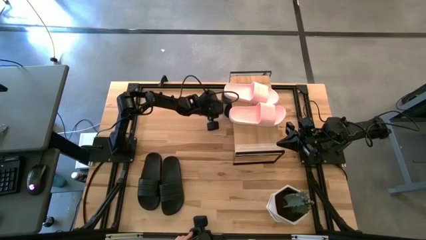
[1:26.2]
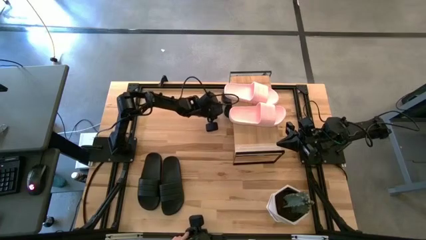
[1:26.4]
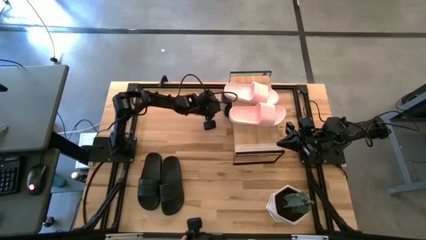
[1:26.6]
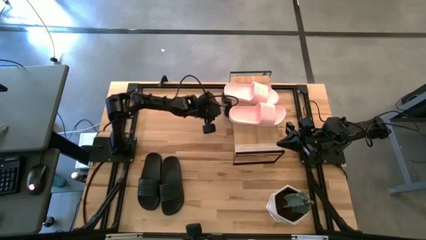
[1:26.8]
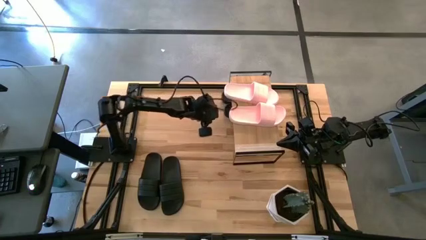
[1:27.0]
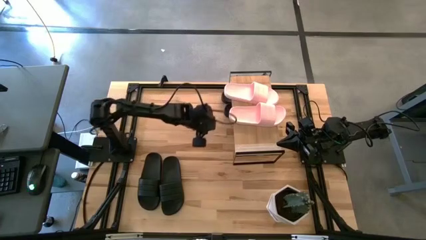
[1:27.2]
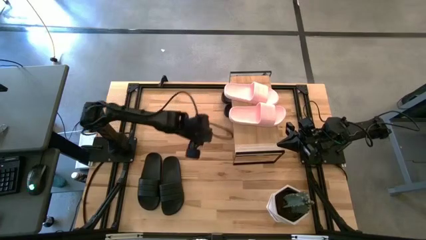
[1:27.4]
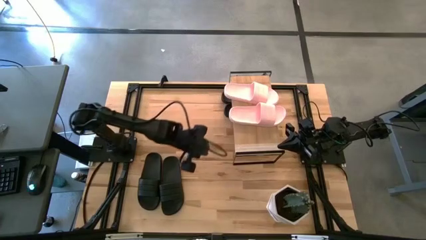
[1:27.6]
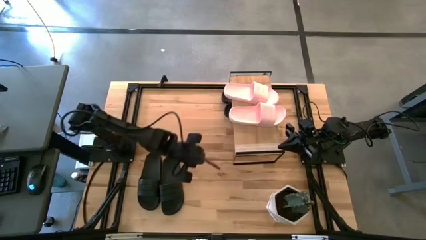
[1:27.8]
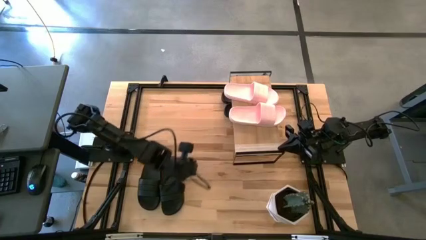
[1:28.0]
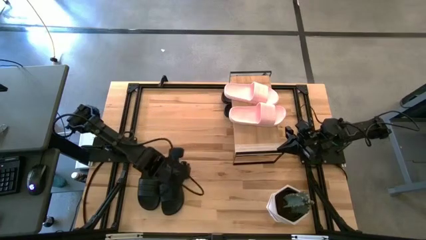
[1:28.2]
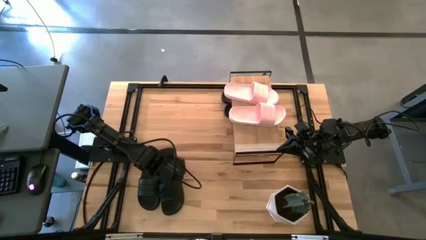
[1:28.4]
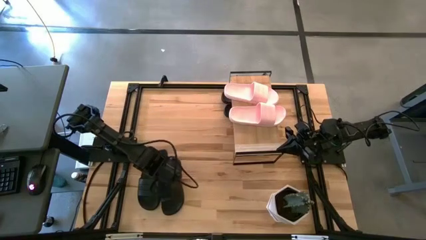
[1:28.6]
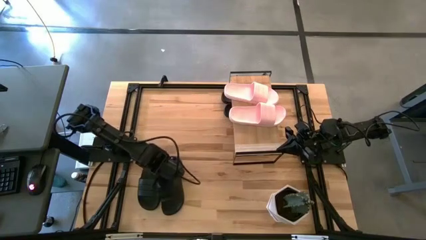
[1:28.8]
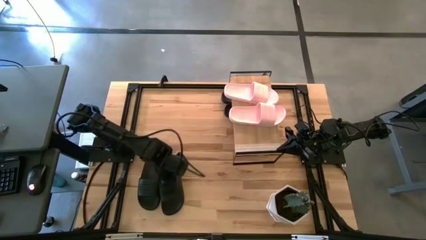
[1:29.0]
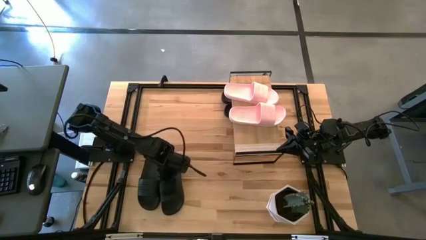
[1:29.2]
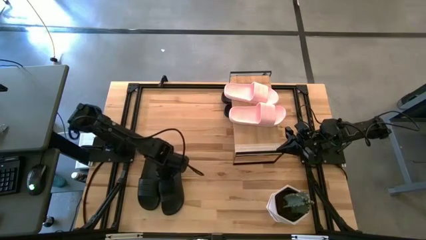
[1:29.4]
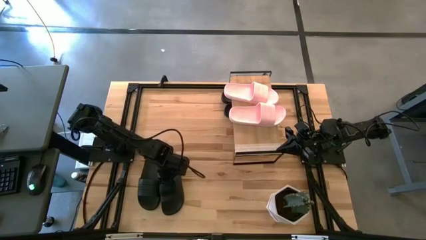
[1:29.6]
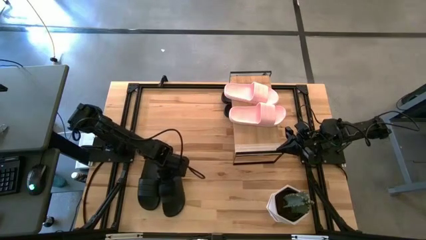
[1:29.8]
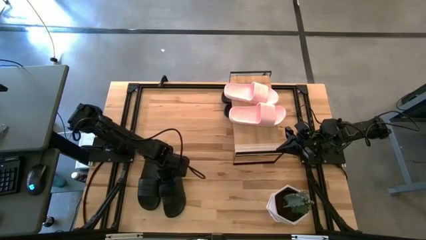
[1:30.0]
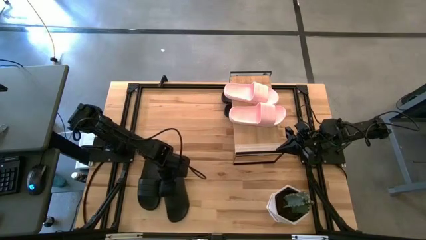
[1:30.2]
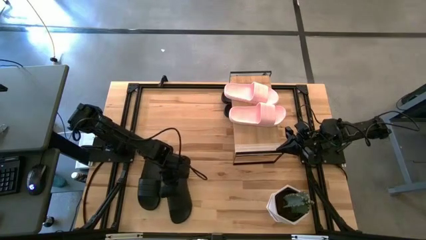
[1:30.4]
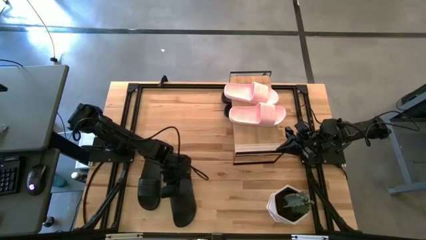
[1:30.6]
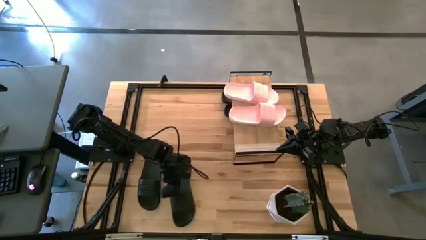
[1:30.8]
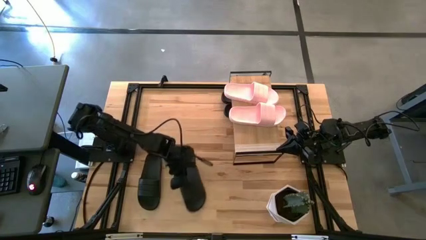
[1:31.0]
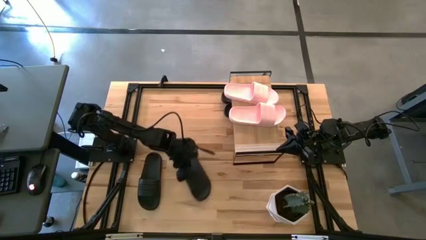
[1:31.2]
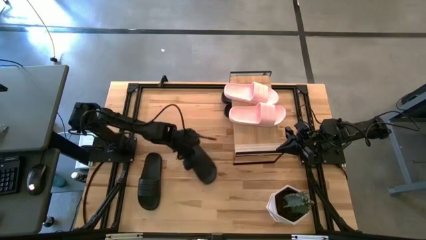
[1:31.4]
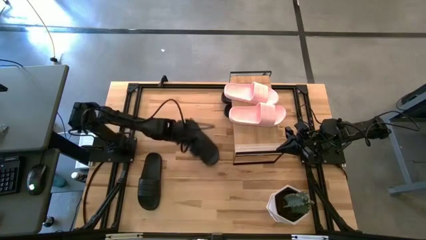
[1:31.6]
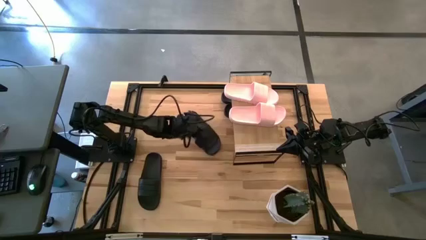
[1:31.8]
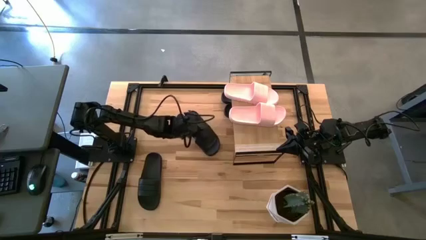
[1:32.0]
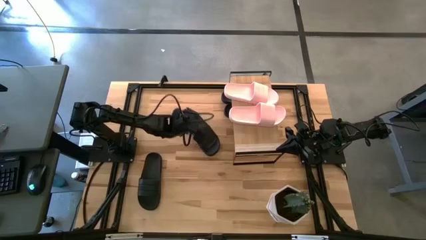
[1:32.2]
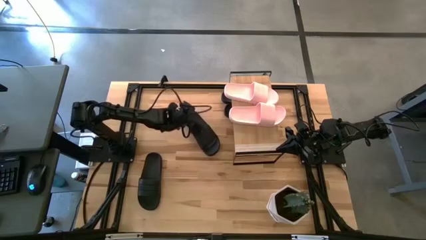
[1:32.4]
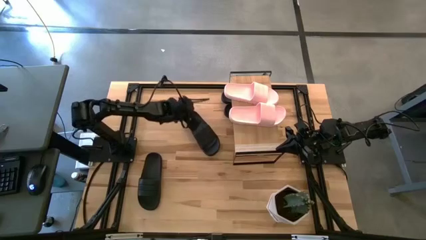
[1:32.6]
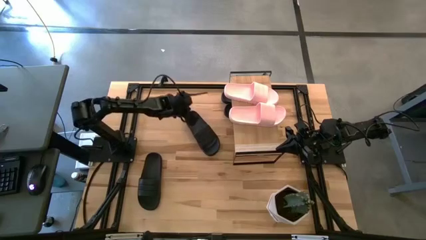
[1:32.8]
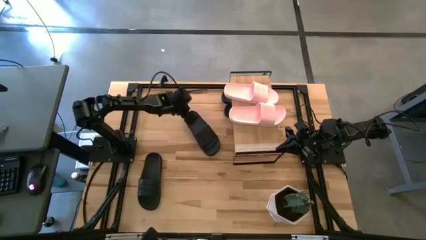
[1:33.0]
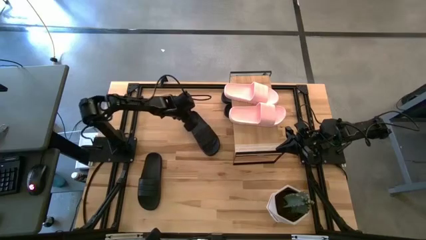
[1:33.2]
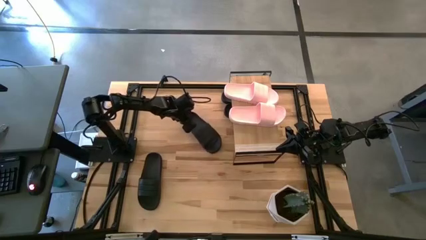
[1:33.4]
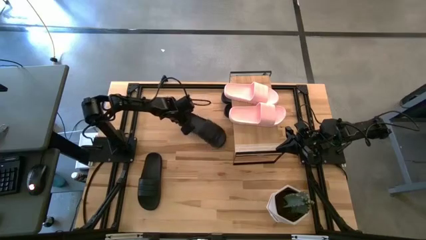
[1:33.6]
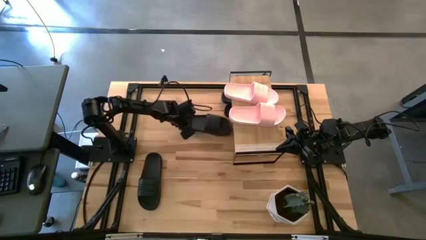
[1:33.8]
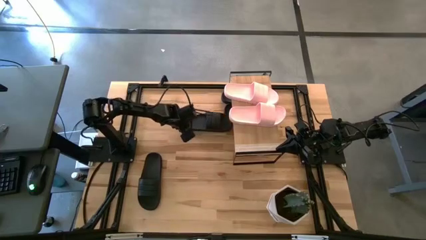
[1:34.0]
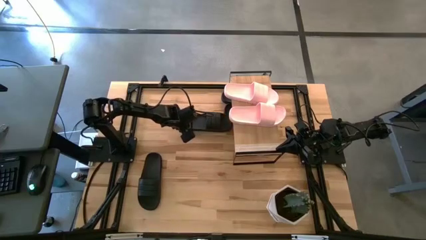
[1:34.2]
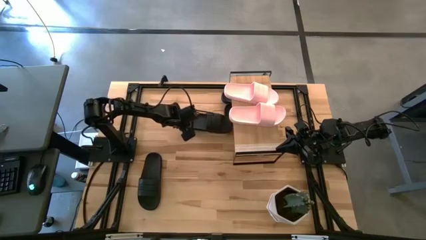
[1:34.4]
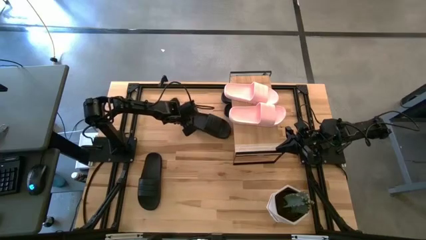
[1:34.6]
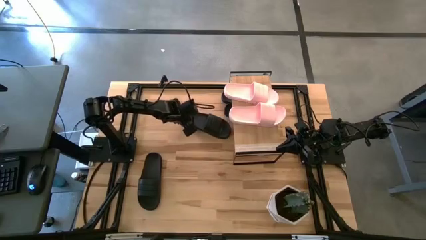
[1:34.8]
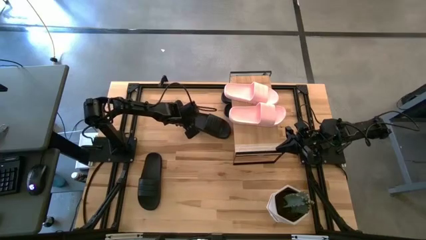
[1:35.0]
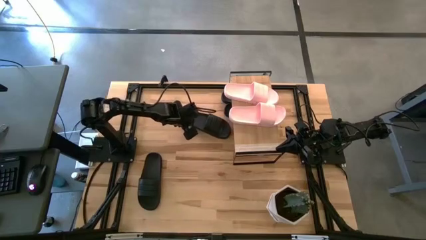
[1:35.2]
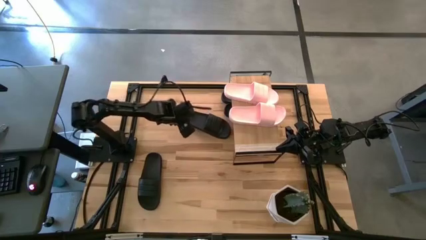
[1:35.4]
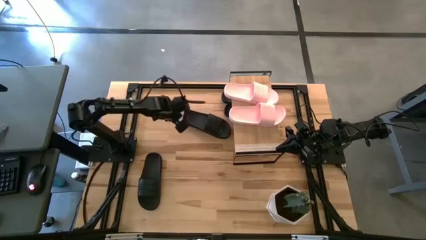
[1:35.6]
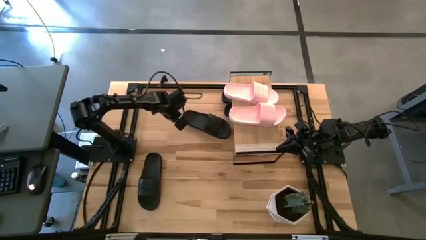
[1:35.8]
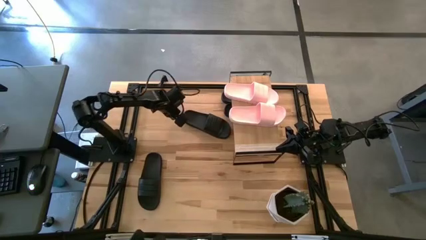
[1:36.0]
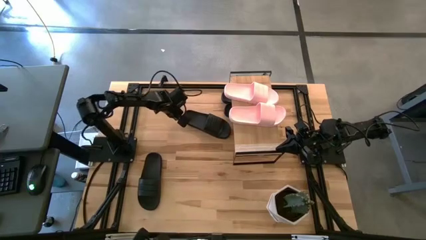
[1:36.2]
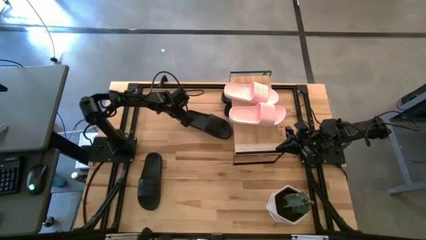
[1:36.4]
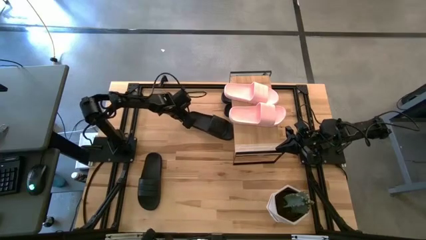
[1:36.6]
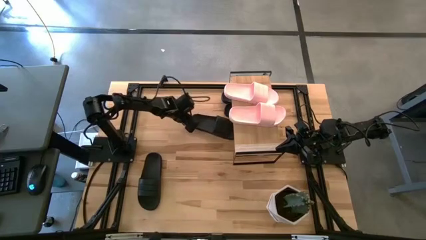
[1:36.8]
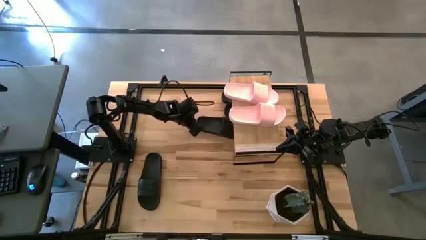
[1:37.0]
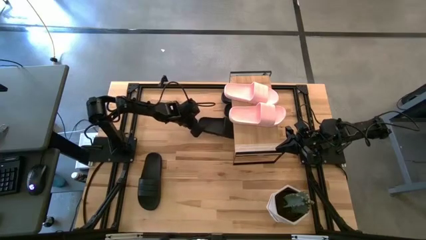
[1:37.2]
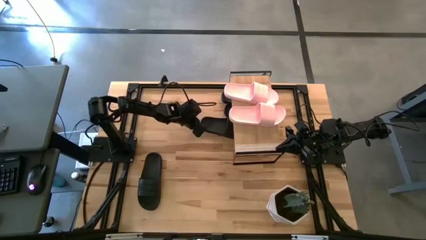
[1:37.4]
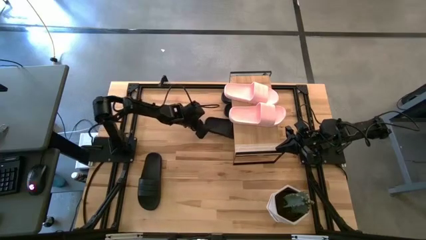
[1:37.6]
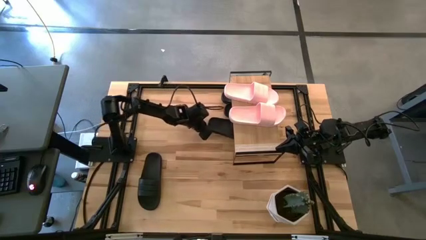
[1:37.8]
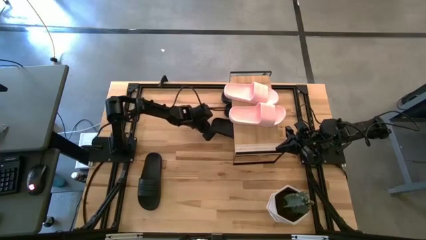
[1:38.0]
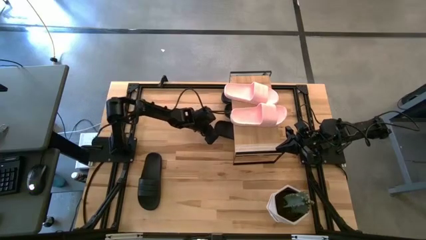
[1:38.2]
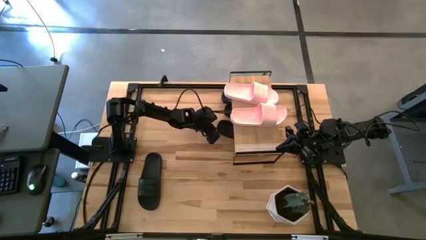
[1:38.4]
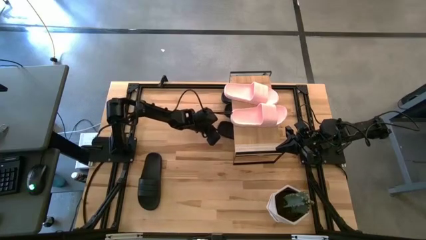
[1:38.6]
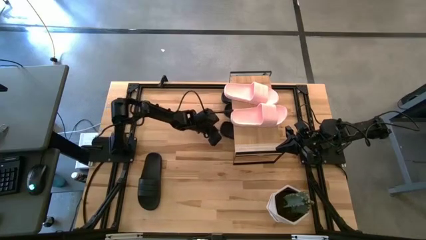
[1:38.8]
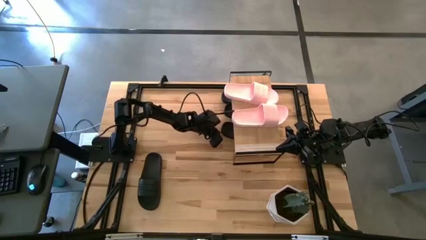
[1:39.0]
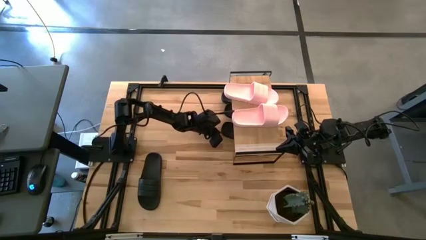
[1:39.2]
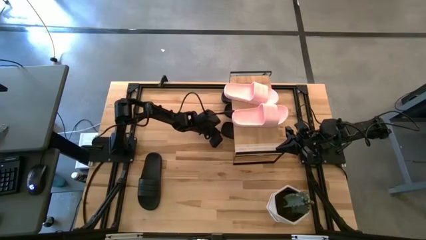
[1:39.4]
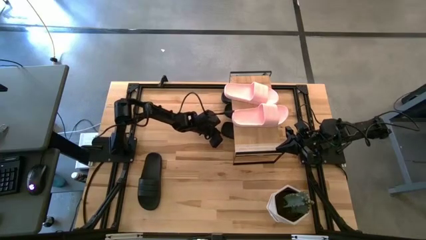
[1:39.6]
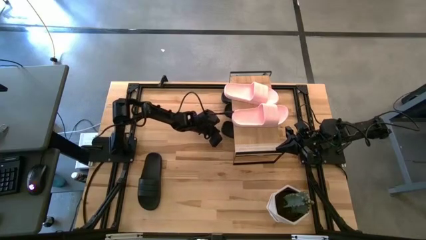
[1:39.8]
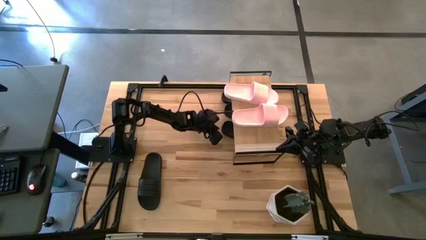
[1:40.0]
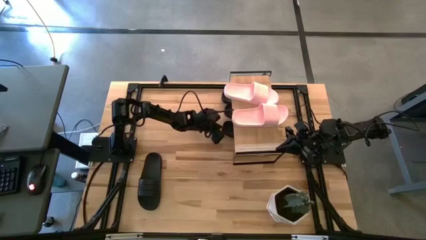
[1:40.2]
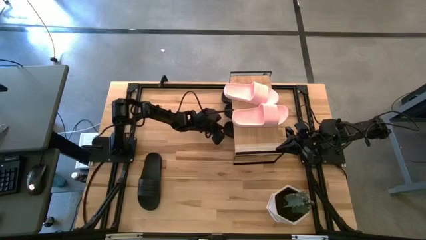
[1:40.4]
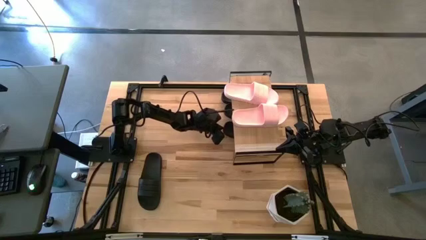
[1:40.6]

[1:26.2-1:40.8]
Task: Pick and place slides into the shelf
Put the black slide under the shelf

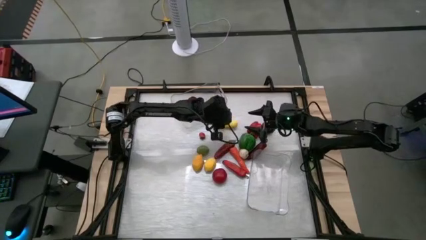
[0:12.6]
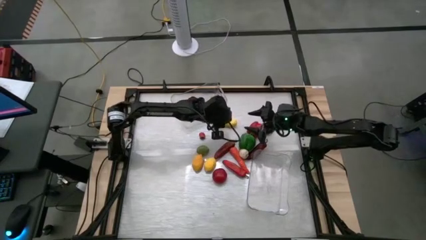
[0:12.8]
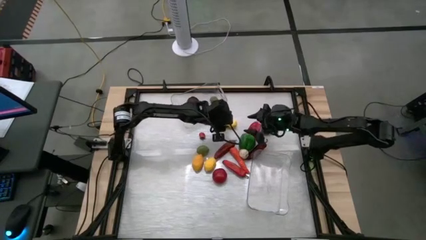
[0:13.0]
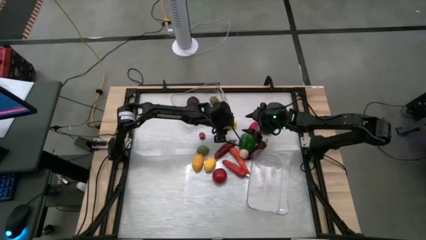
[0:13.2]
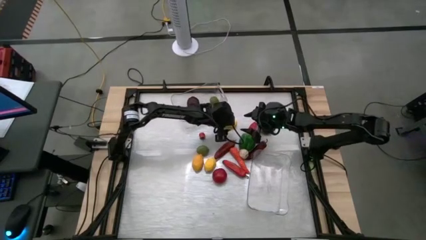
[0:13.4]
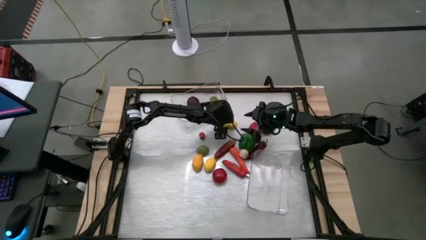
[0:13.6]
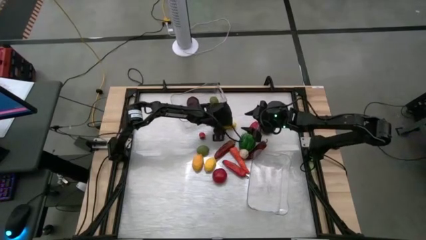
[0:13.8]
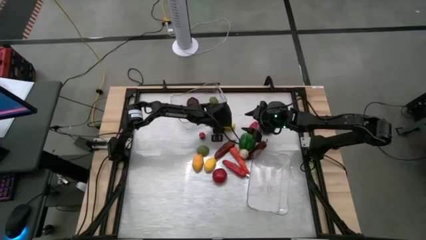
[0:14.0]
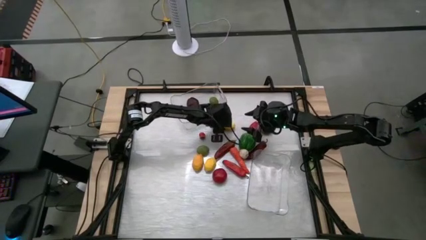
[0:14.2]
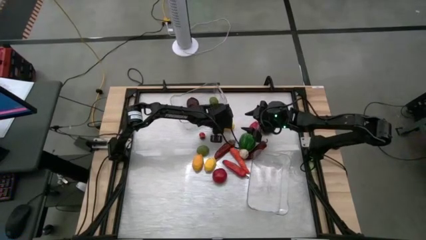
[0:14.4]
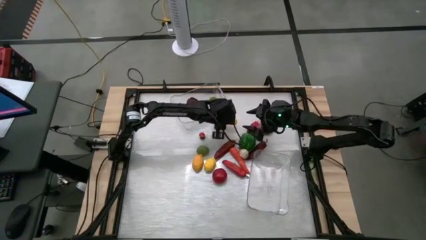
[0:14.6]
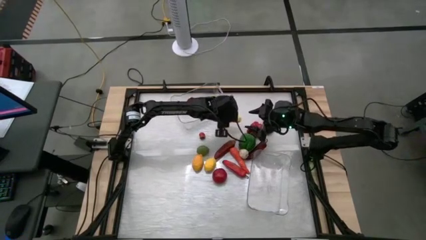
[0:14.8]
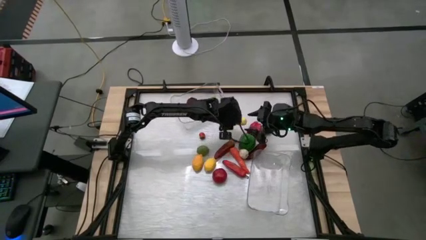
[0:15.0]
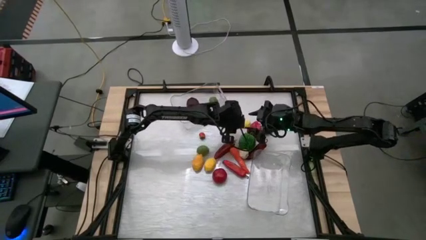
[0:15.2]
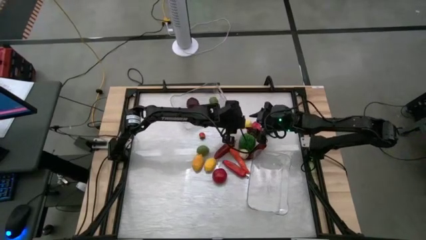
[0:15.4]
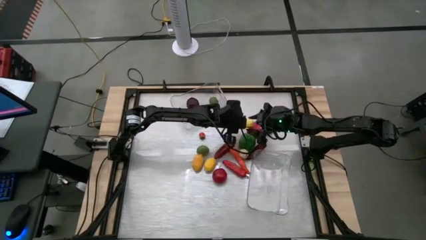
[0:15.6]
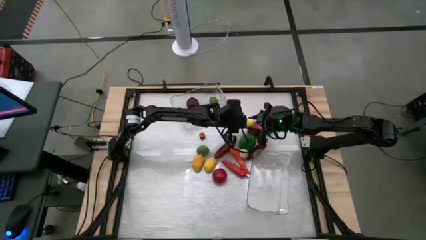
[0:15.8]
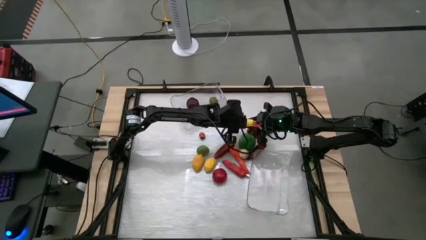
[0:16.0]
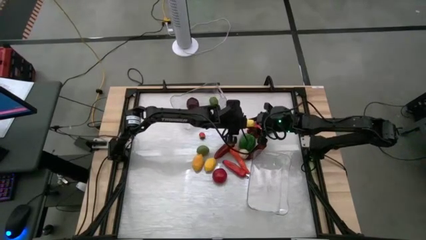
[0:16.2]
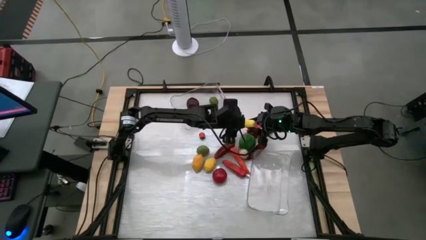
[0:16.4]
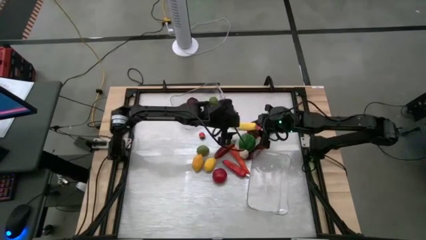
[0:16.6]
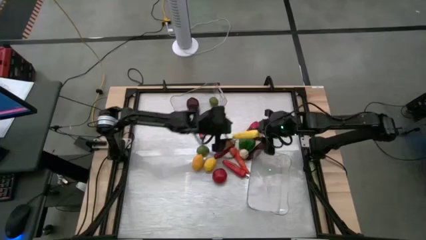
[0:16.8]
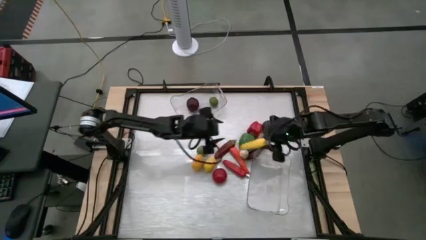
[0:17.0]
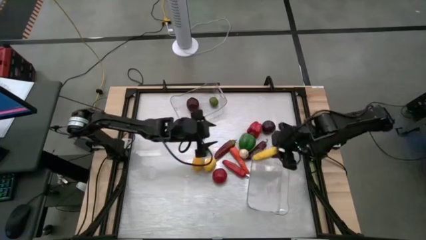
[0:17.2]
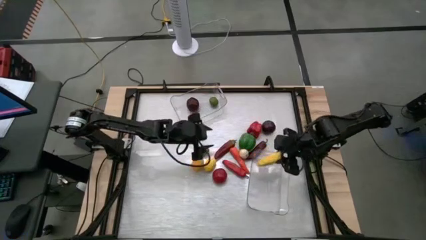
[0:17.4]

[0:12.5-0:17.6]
Task: Sort produce into baskets
Put the yellow corn into the bottom transparent bin
